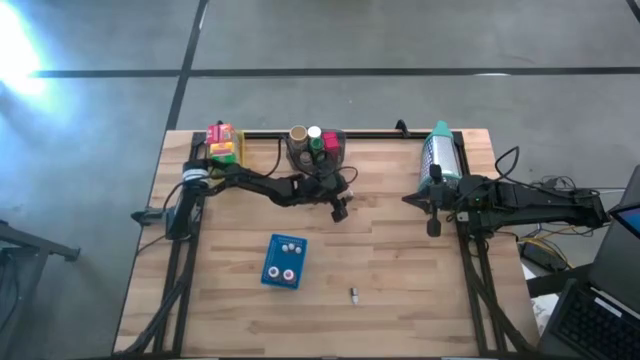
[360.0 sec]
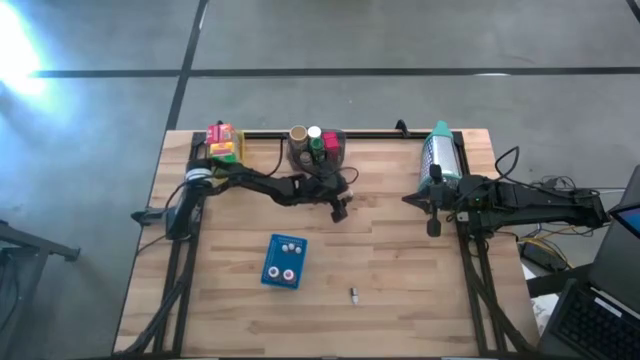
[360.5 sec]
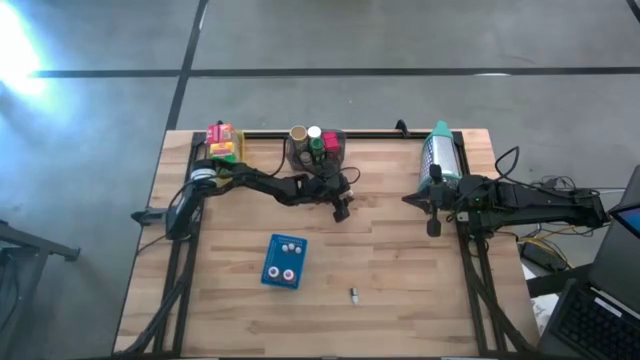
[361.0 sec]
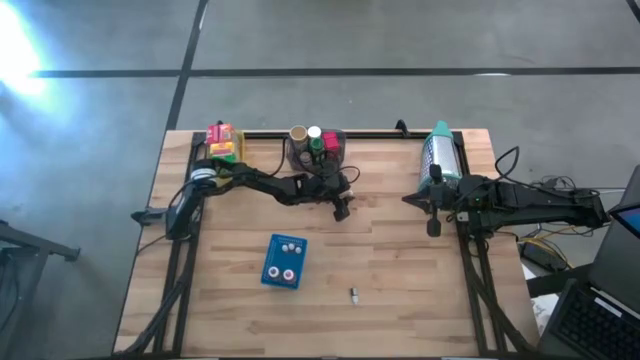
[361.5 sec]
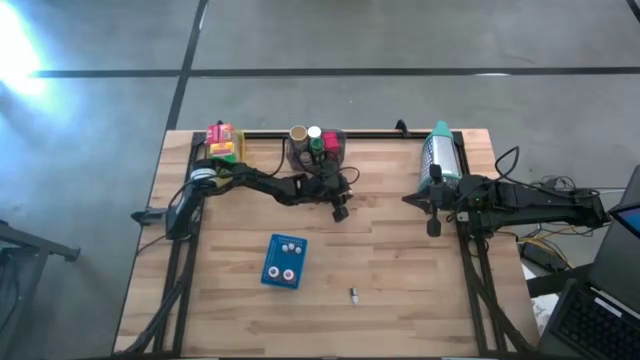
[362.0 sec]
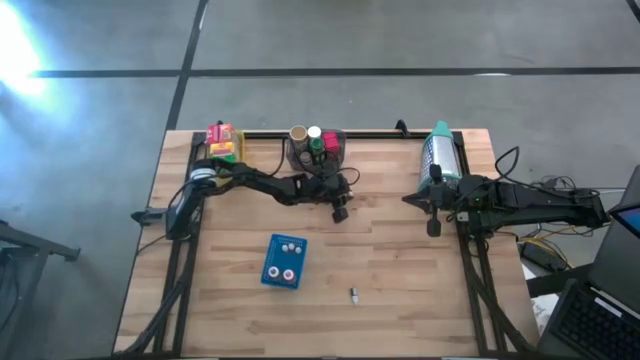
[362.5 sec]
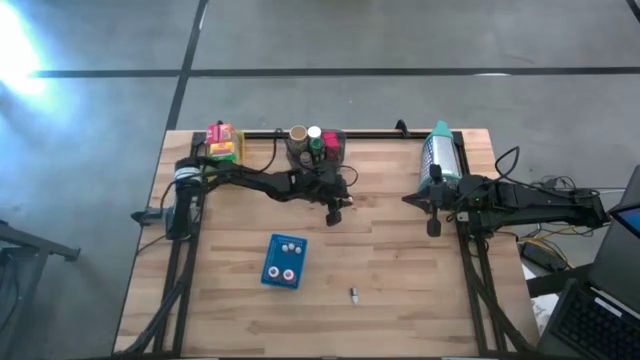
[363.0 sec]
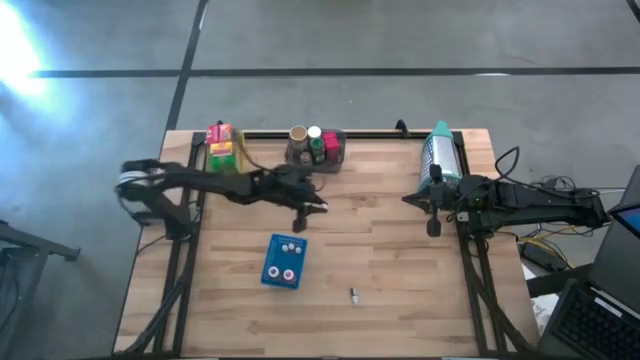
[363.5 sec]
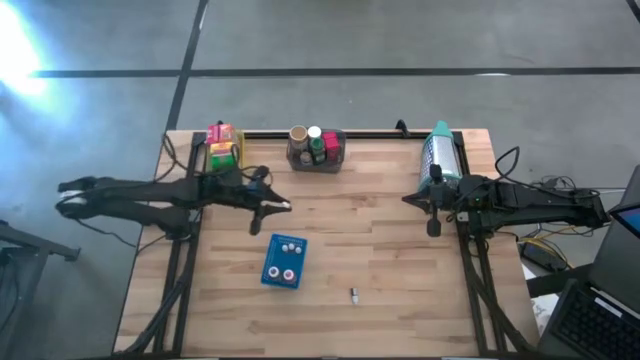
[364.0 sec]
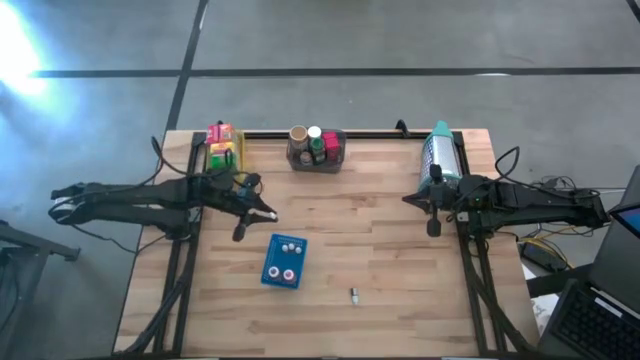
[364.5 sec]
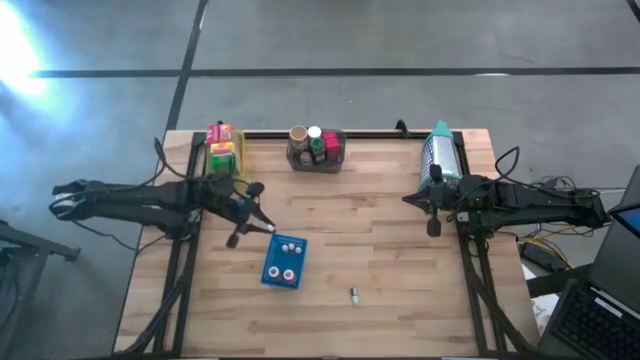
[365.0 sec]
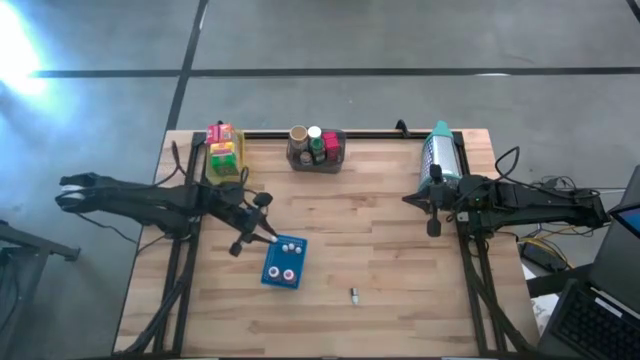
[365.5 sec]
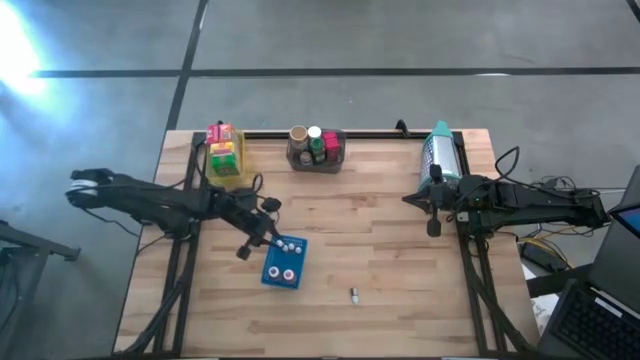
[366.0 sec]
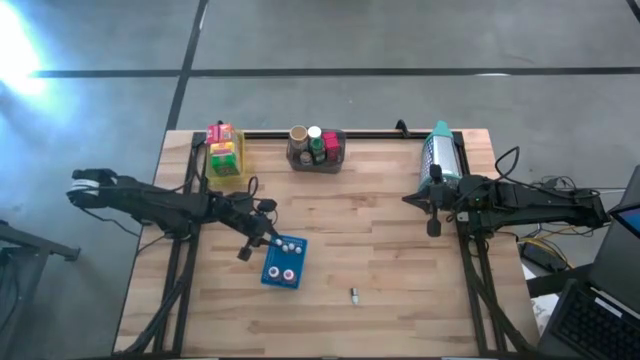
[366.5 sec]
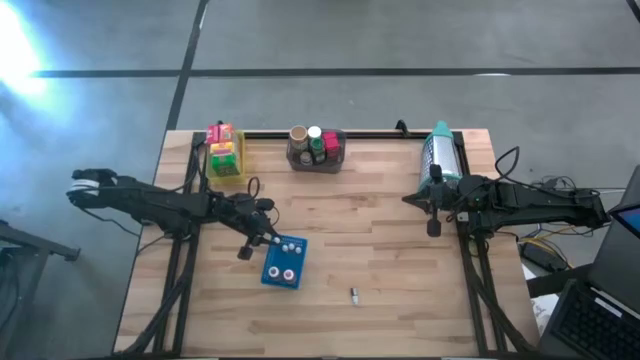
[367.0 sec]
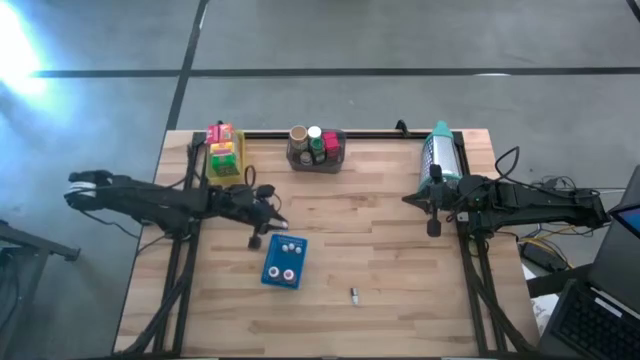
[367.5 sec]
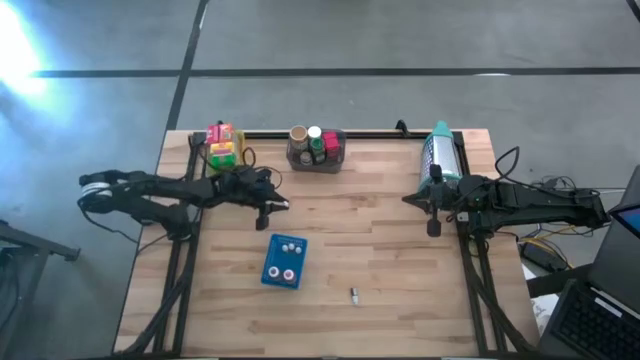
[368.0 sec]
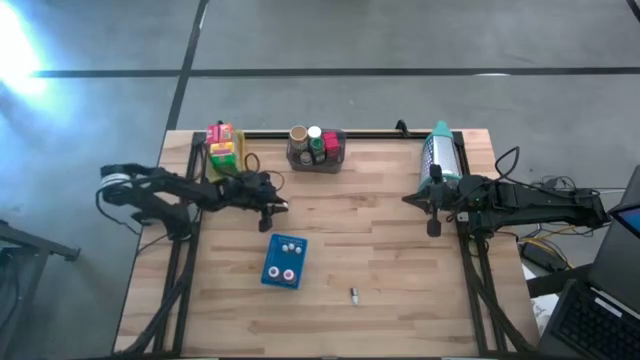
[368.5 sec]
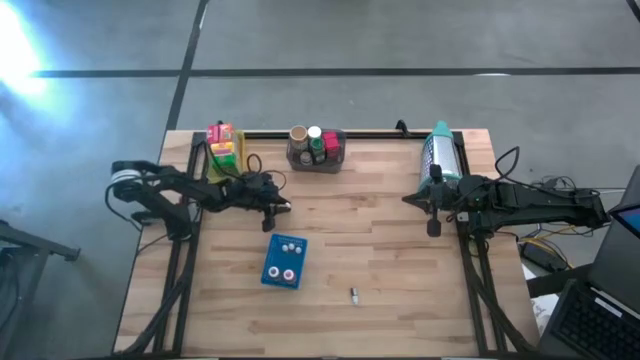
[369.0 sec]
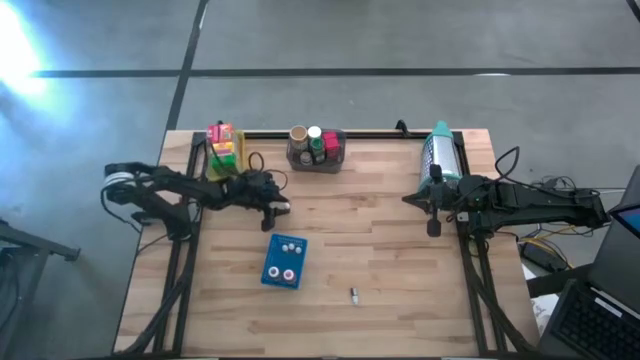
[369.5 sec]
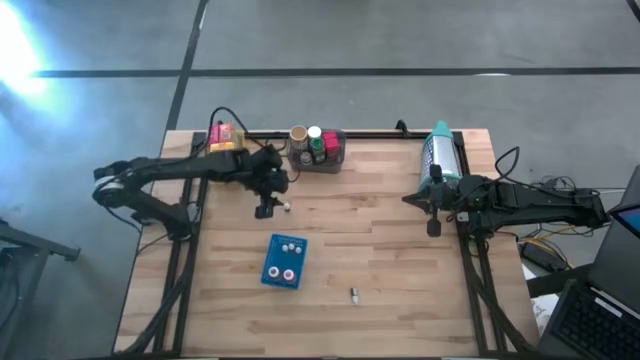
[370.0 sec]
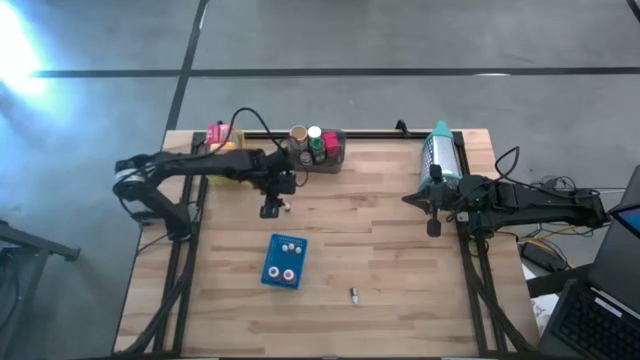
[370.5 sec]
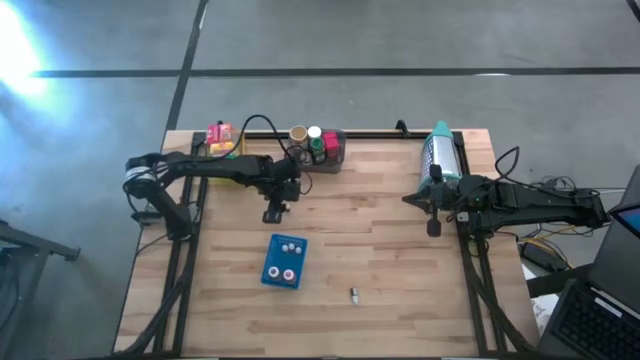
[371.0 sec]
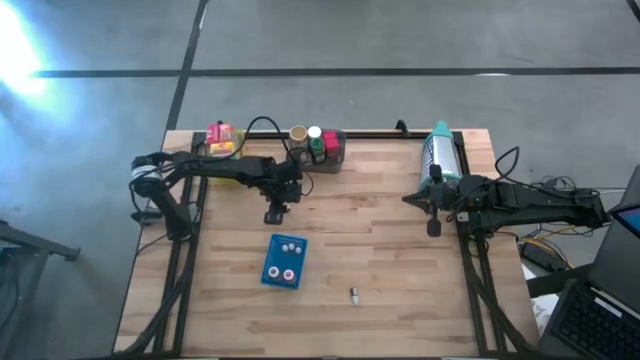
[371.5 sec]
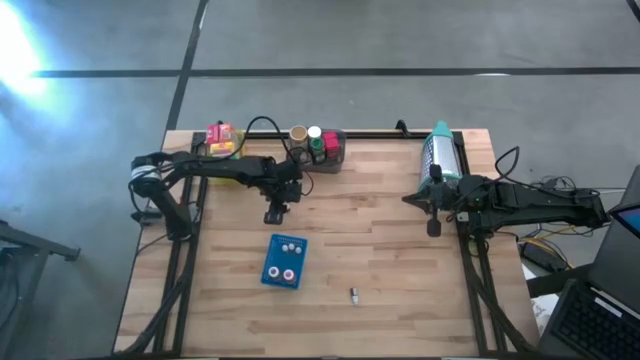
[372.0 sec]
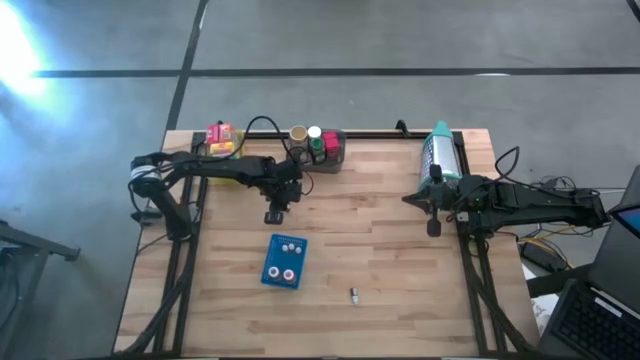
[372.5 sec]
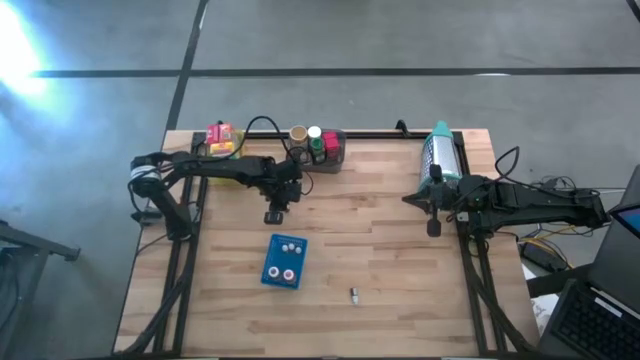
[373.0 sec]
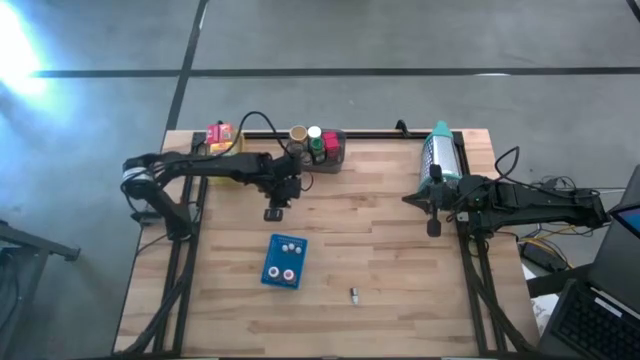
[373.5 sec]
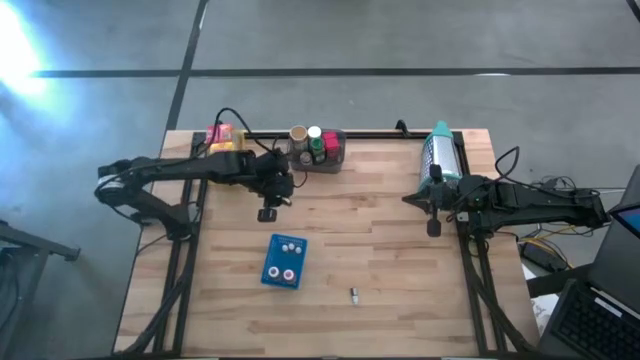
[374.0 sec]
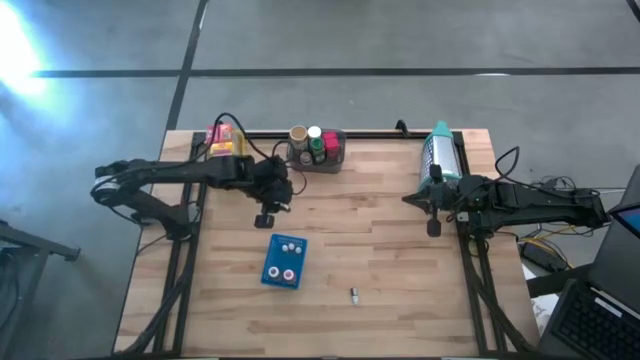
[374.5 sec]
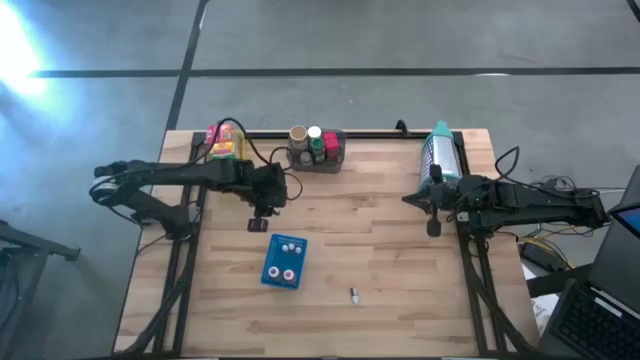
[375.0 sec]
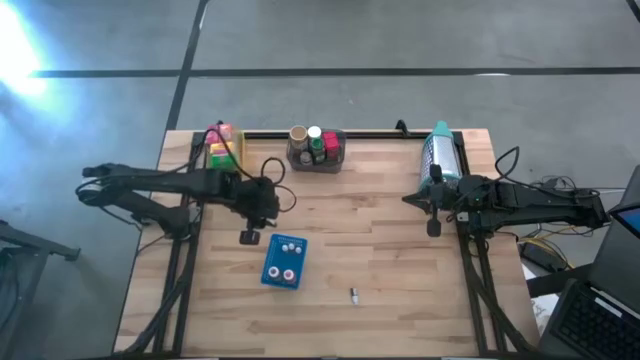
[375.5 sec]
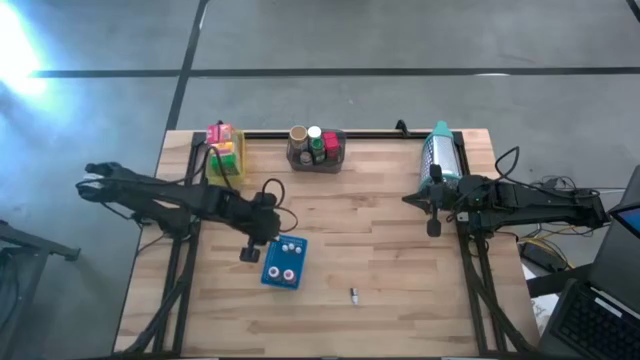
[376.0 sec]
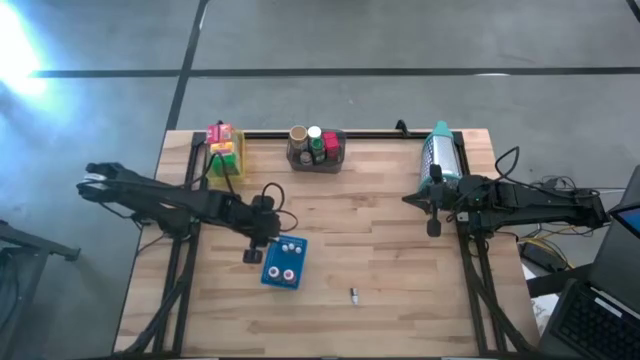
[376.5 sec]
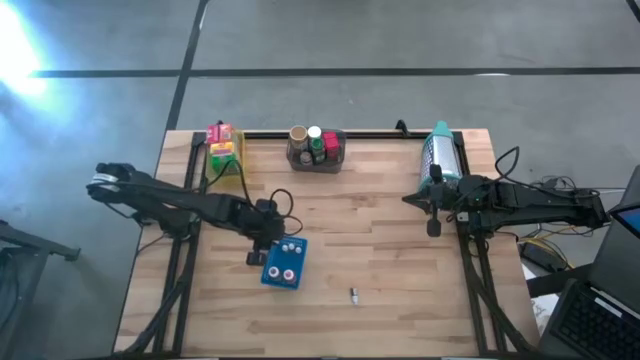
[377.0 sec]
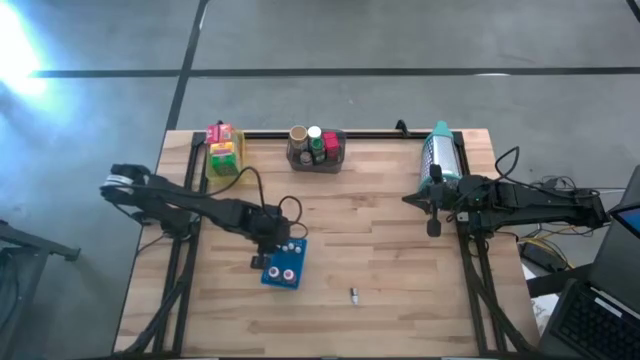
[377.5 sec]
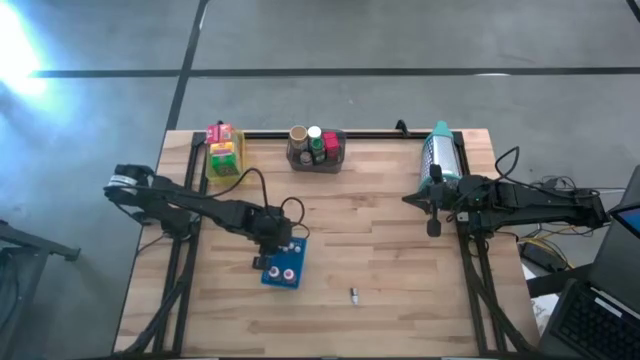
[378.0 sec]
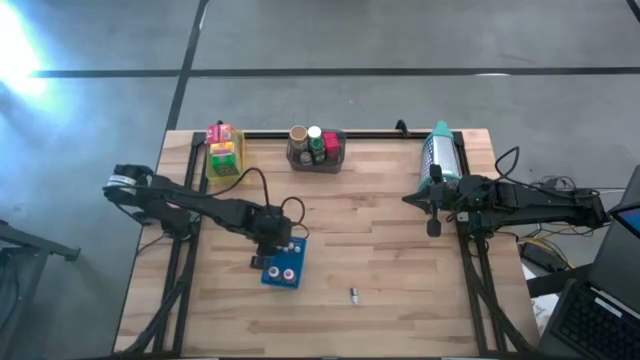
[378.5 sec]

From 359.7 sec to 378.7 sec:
Task: Pick & Place Kitchen Items
Put the black food coloring bottle into the blue bin

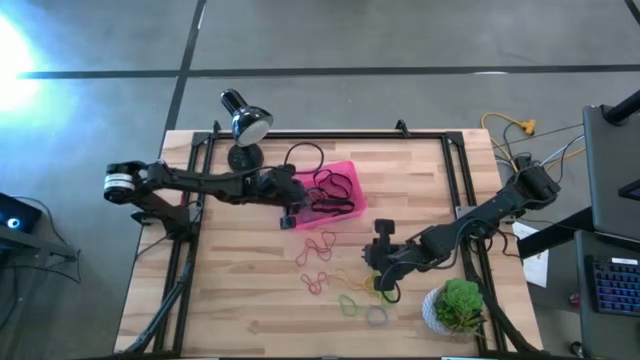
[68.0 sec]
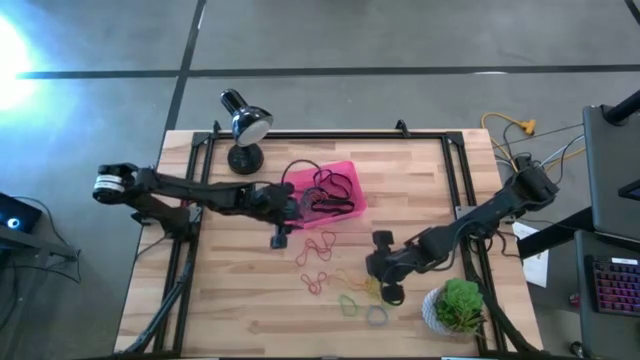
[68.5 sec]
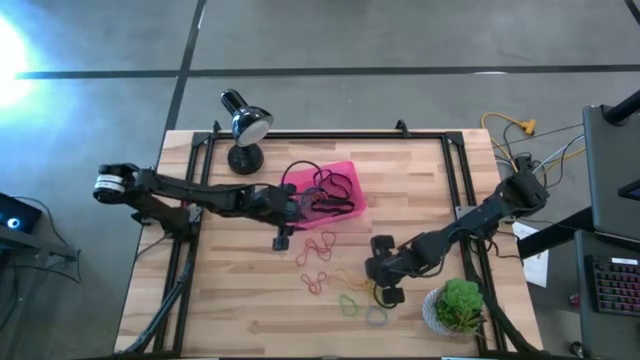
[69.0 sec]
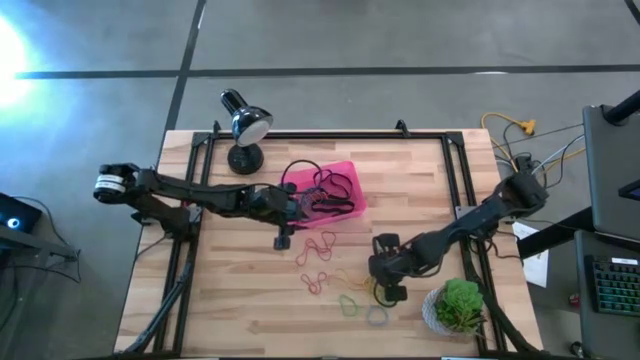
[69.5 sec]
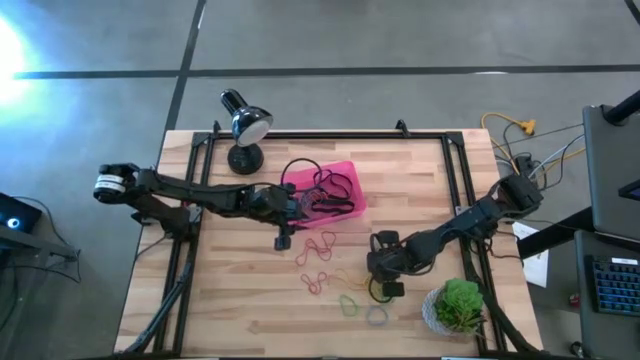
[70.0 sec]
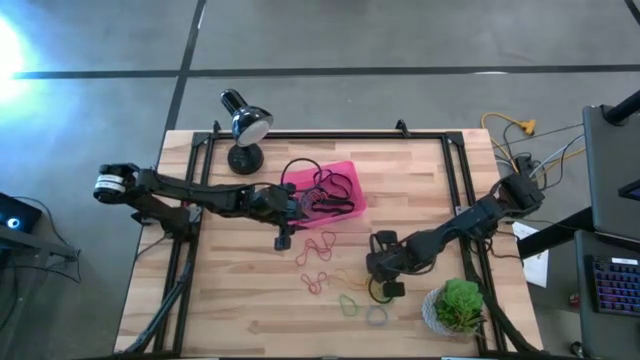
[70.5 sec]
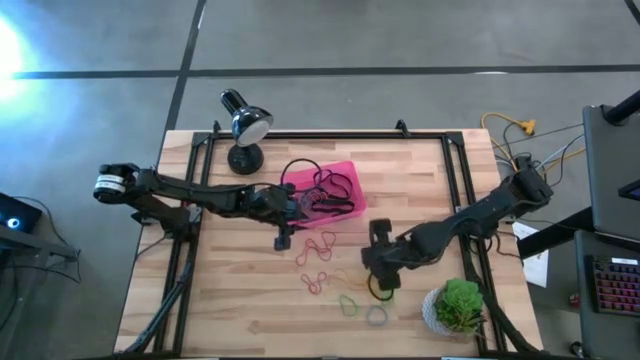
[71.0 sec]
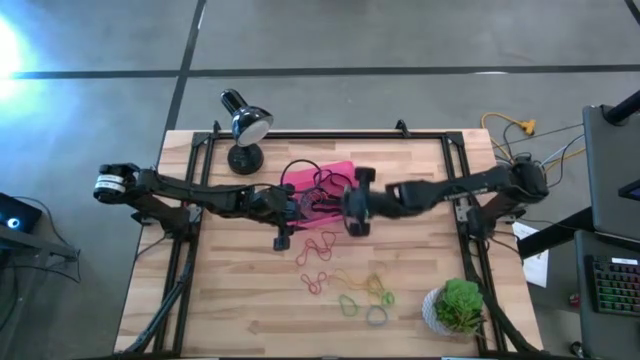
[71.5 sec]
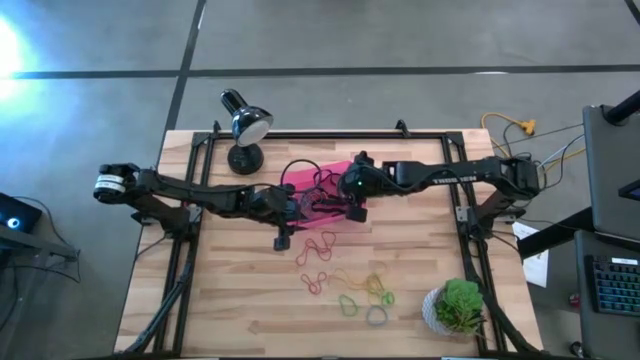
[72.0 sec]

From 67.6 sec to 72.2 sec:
Task: Pick and place rubber bands into bin
Put the green rubber band into the red bin
